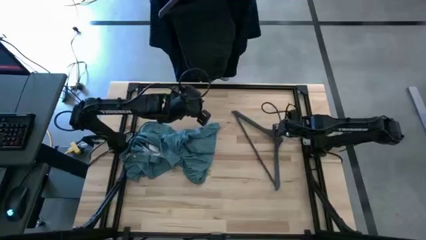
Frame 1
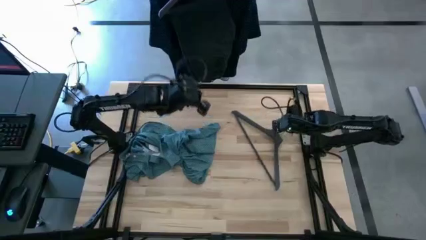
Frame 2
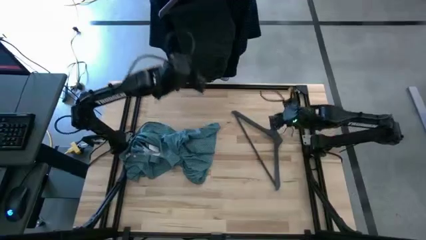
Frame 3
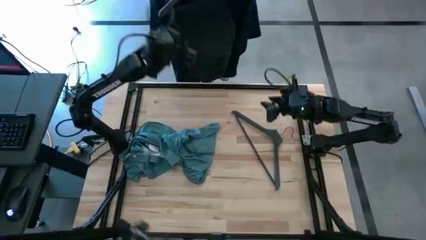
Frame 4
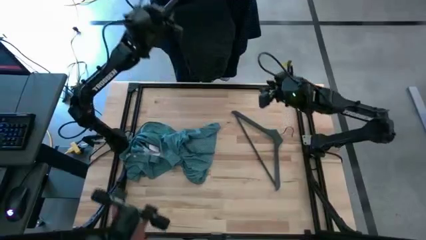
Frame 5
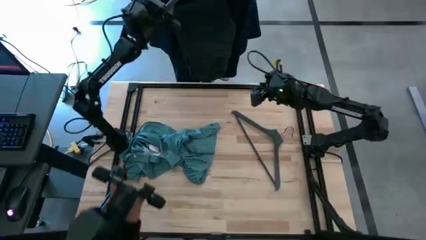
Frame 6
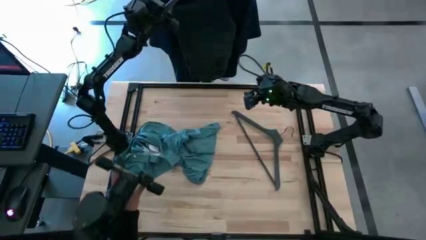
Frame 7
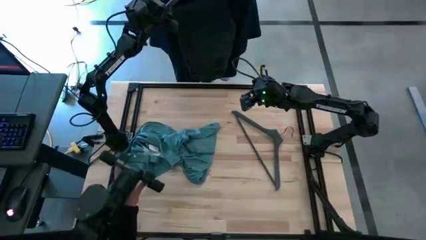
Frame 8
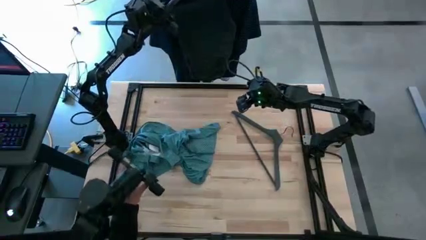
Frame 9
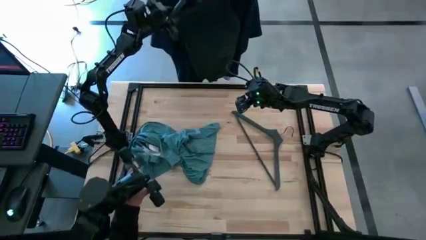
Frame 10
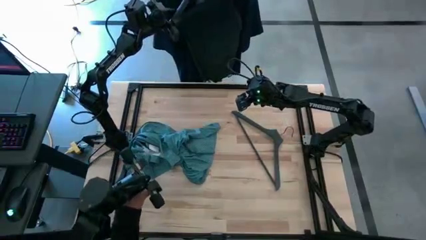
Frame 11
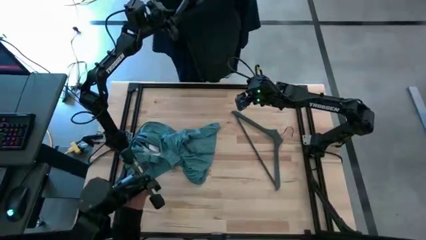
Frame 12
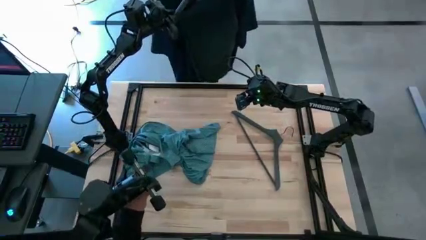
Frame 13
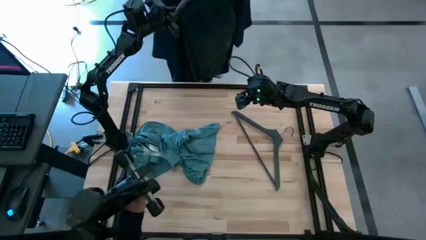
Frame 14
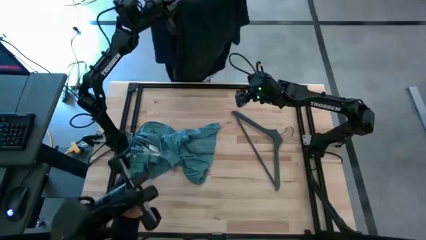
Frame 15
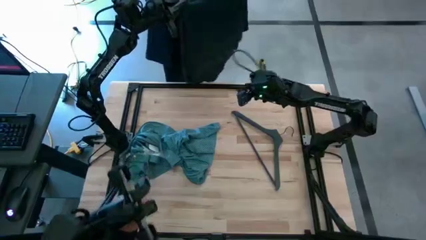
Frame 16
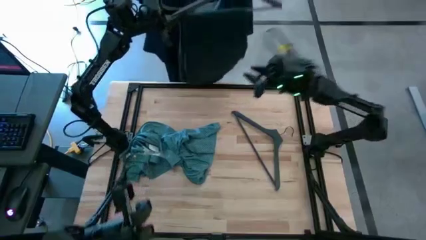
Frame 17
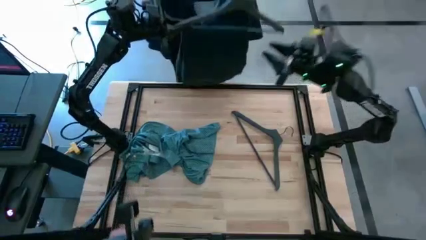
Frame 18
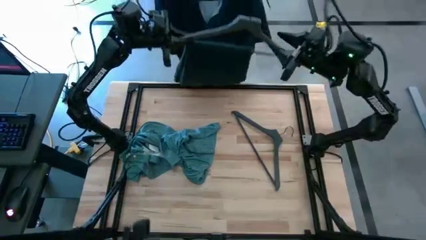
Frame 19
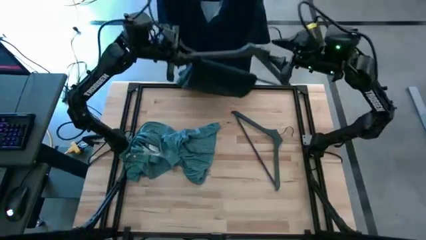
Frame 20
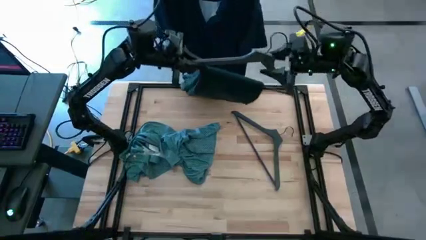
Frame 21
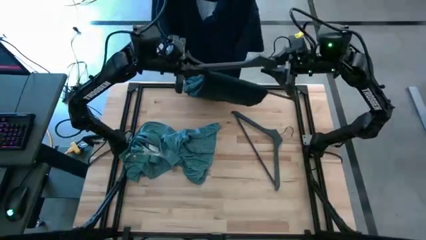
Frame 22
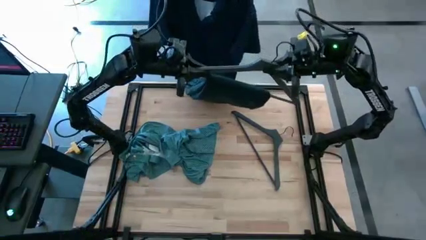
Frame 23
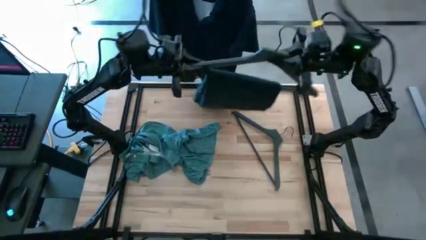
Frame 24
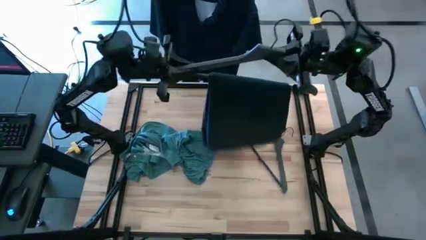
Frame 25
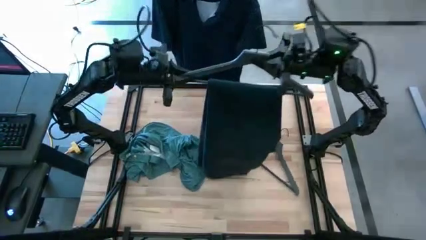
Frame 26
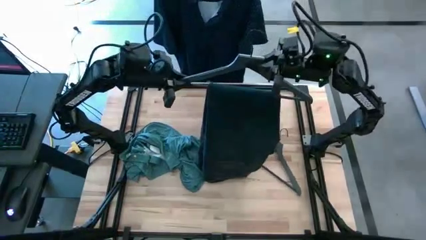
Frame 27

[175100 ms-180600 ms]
Task: Hang clothes
Unhang the hangered blue pants from the hanger rack

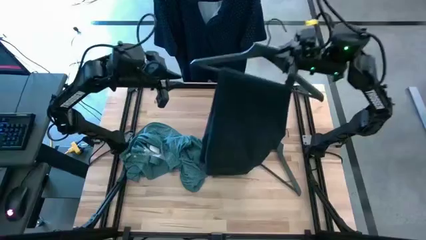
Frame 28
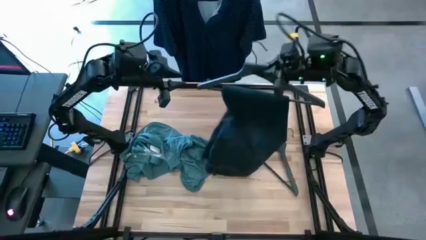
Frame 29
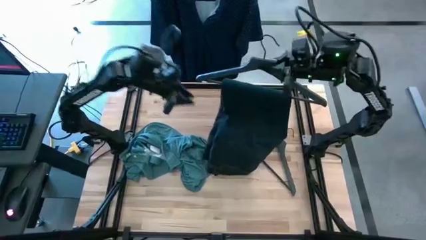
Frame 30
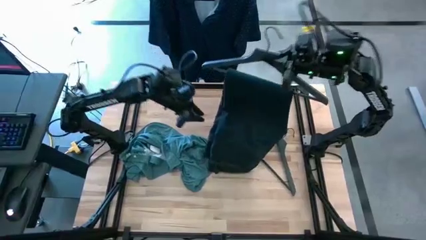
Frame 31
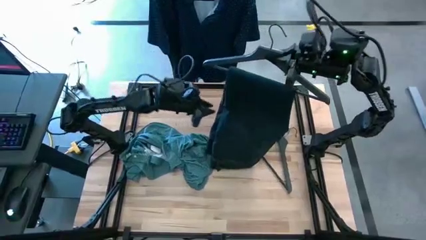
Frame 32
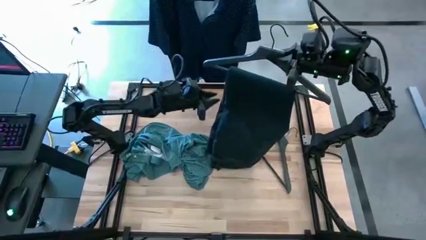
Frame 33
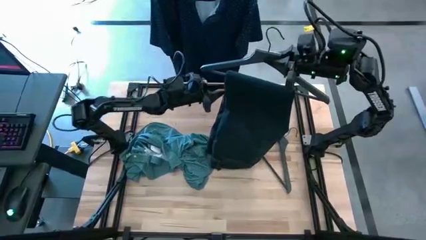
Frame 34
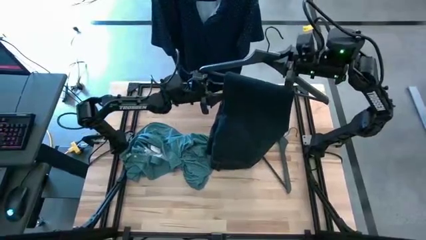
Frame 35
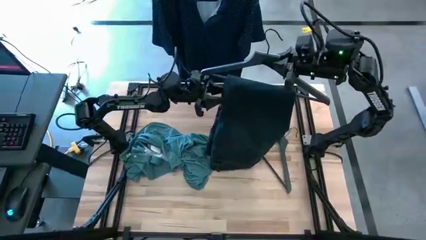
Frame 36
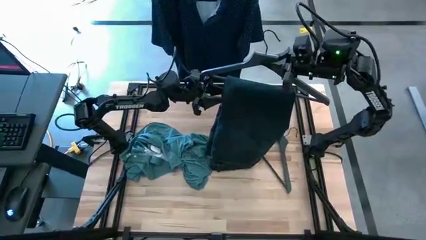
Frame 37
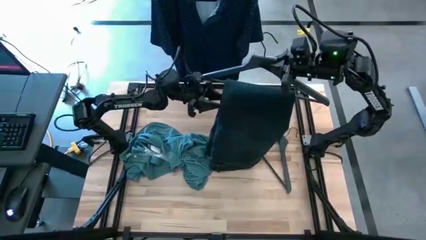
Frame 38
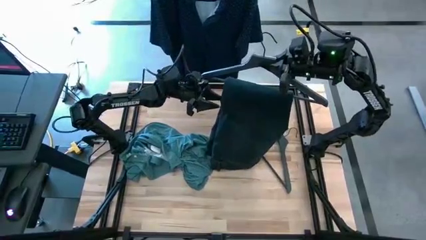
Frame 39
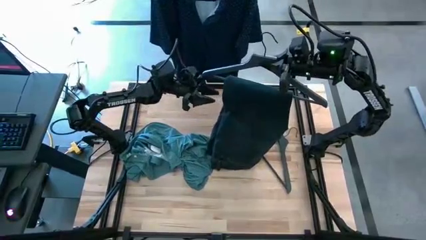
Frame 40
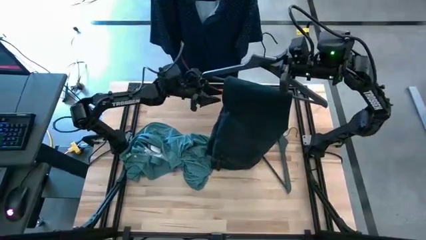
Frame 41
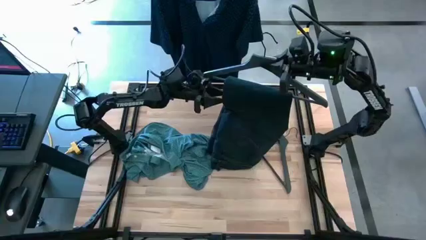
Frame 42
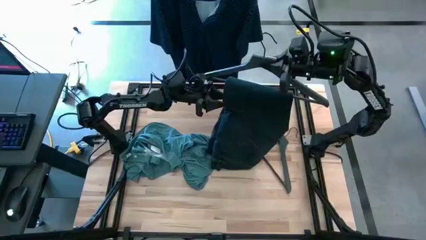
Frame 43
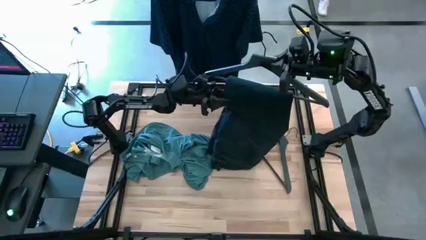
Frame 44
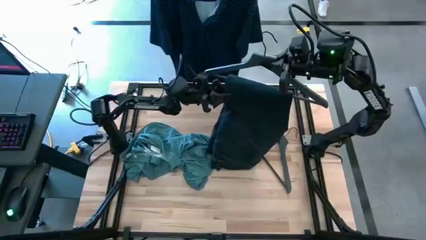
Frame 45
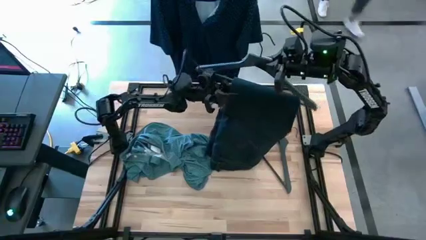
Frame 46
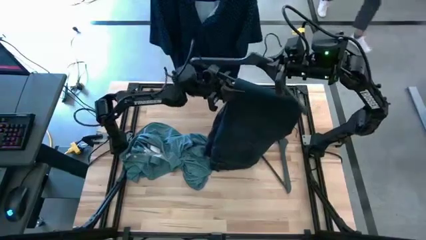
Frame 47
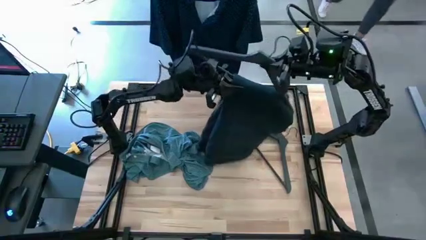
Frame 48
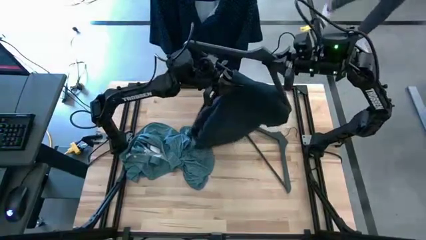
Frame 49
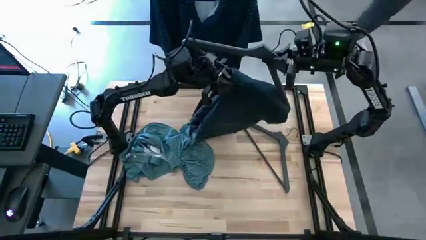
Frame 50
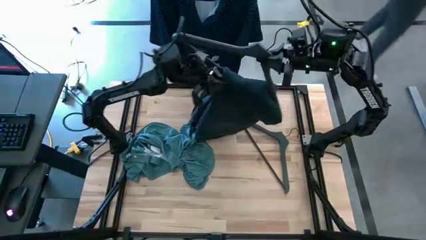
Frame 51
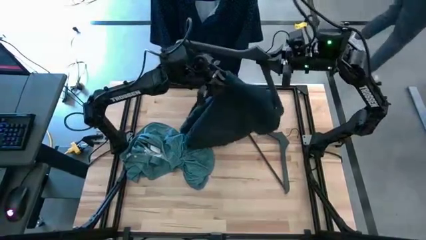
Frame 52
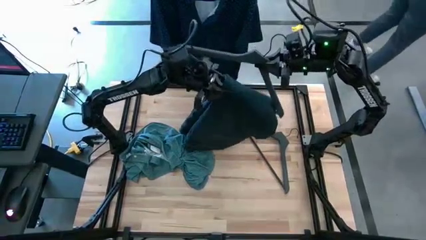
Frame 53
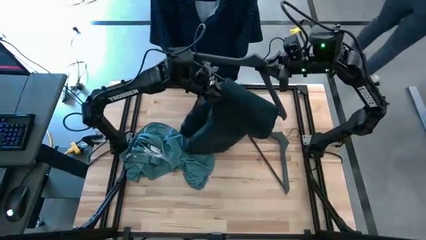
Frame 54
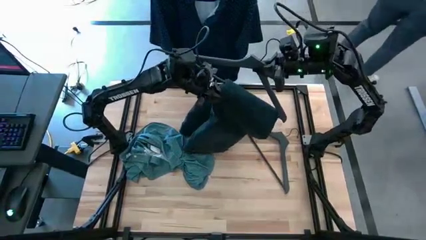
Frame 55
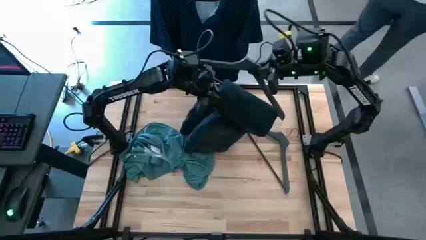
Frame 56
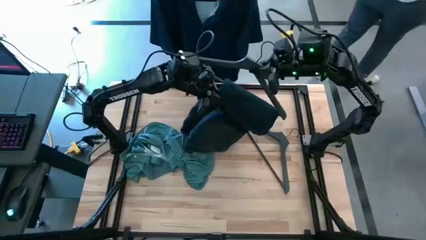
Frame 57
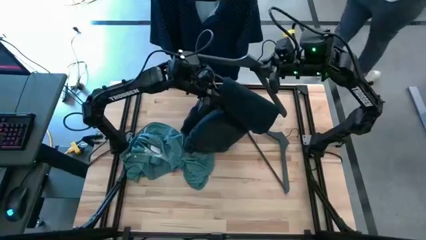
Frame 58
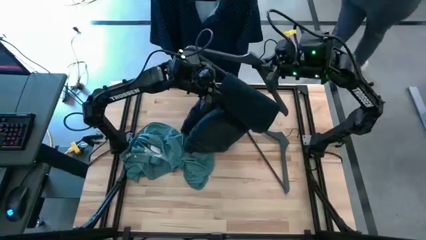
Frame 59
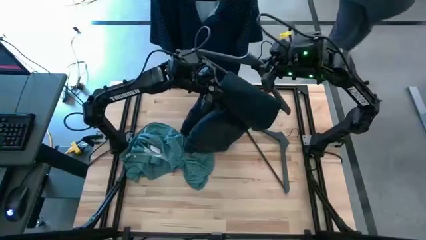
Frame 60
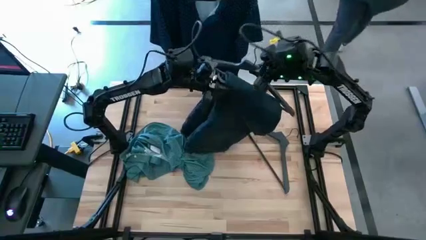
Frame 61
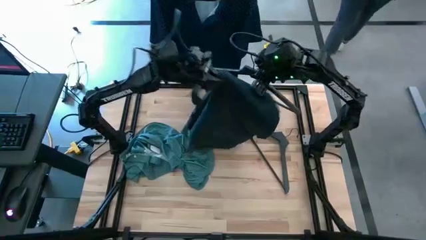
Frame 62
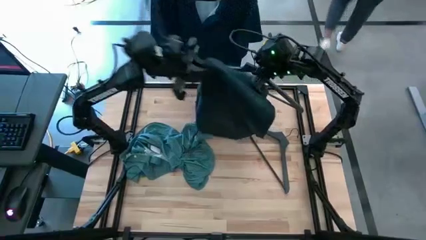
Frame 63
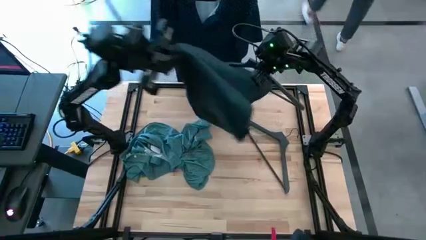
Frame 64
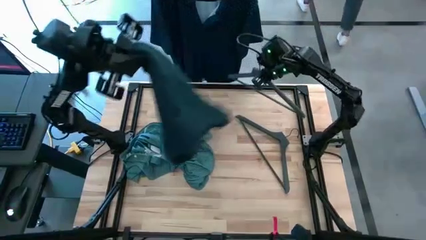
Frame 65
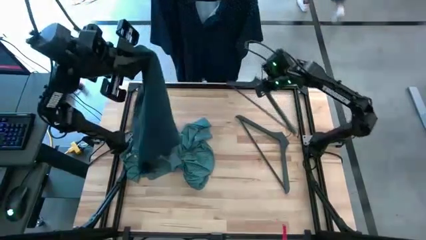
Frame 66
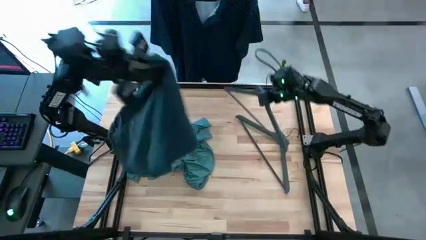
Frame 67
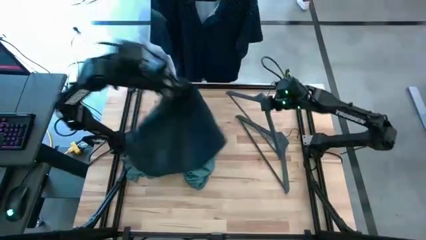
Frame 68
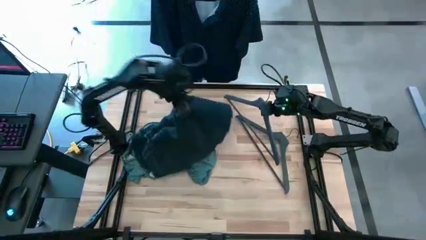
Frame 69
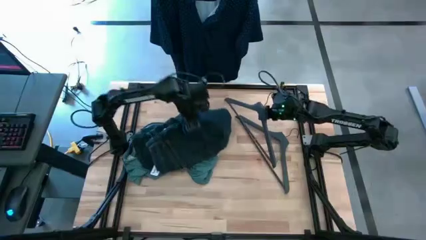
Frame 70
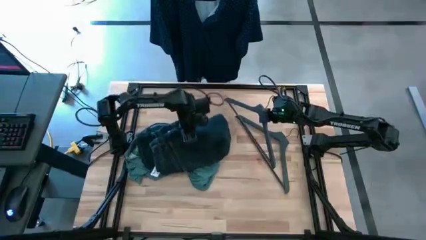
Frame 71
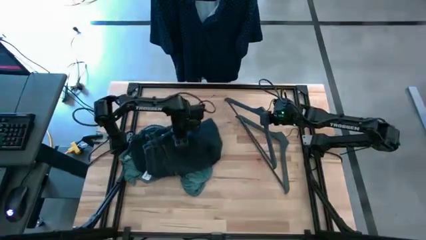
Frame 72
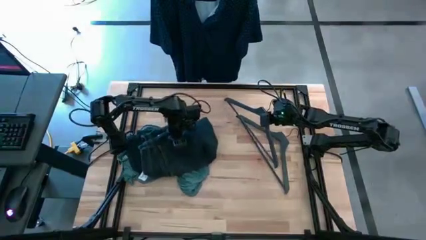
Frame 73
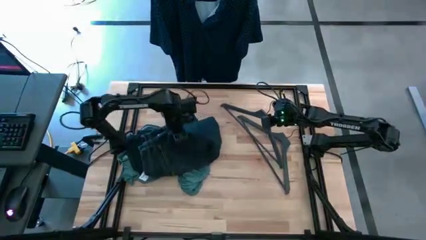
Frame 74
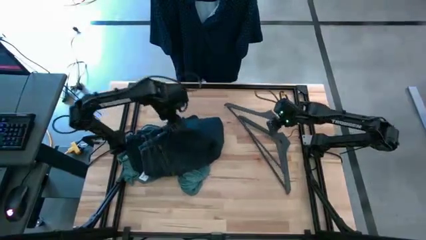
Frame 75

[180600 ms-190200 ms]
Remove the hanger from the blue pants
